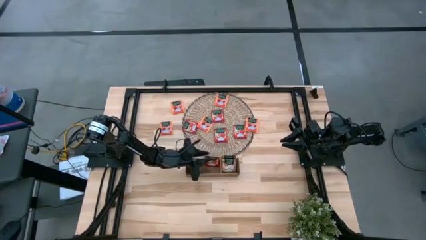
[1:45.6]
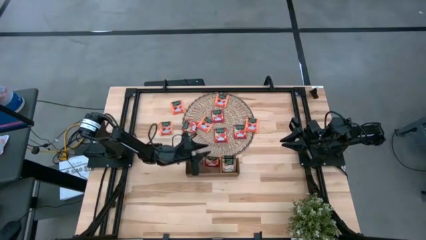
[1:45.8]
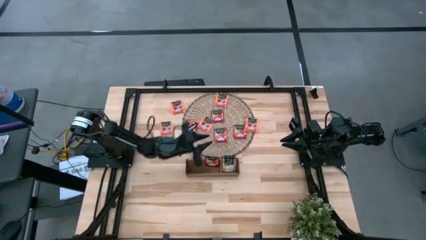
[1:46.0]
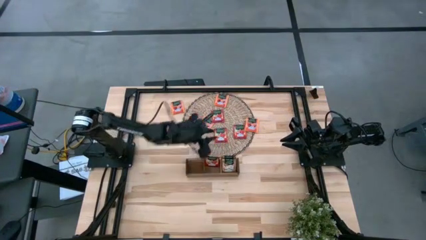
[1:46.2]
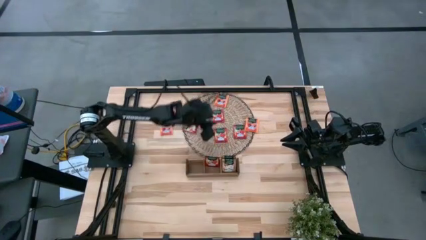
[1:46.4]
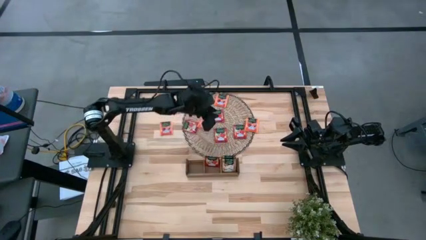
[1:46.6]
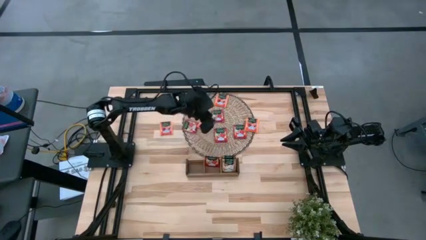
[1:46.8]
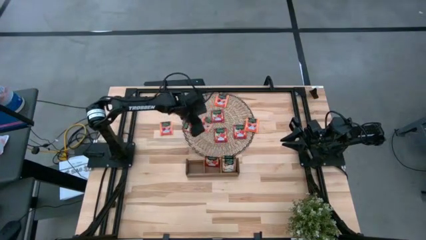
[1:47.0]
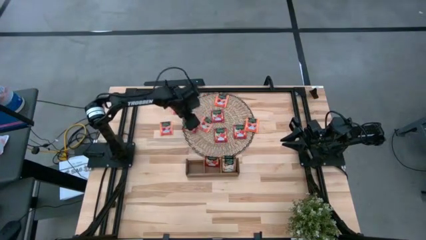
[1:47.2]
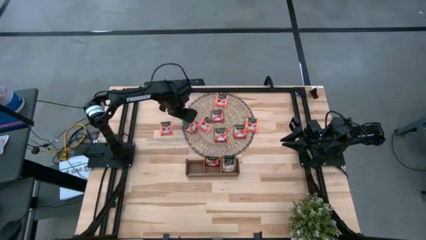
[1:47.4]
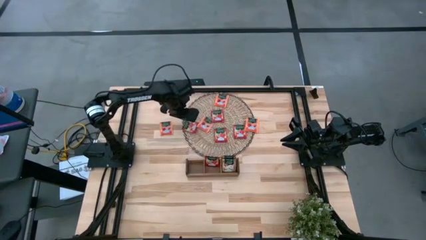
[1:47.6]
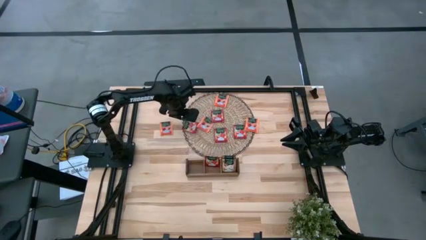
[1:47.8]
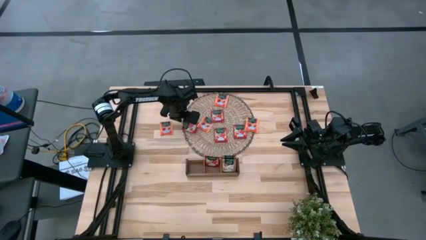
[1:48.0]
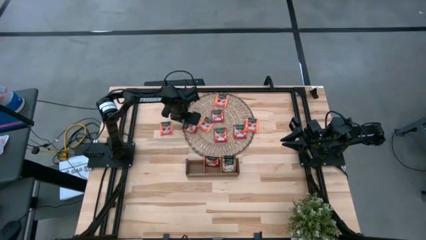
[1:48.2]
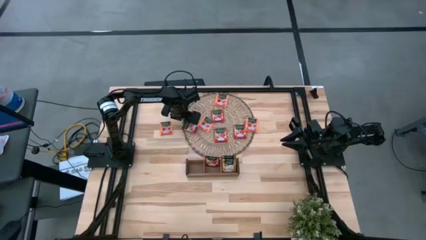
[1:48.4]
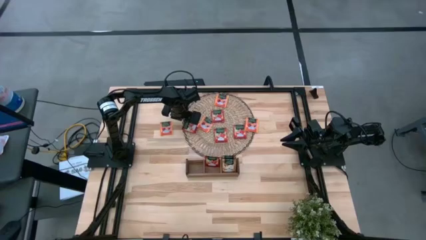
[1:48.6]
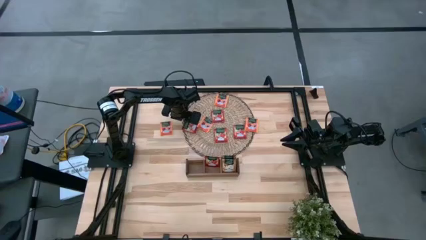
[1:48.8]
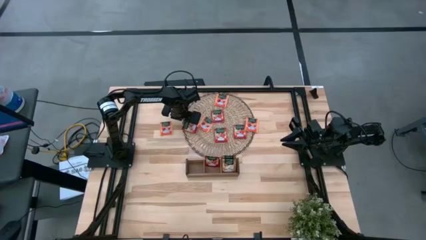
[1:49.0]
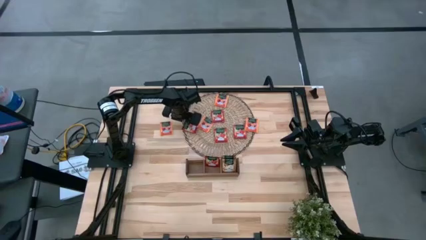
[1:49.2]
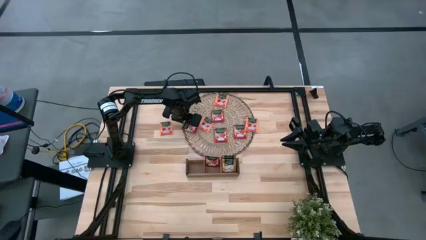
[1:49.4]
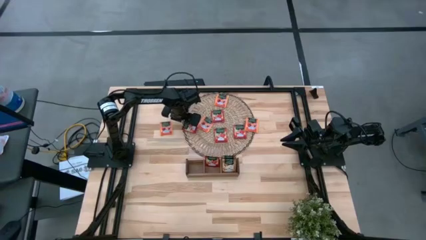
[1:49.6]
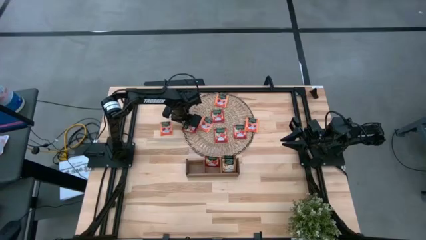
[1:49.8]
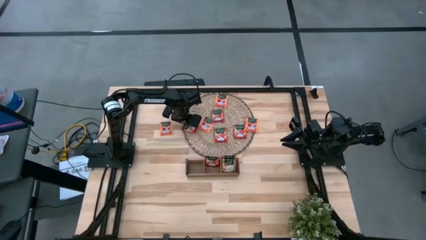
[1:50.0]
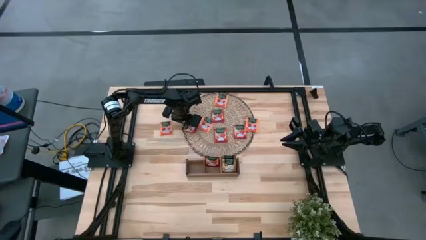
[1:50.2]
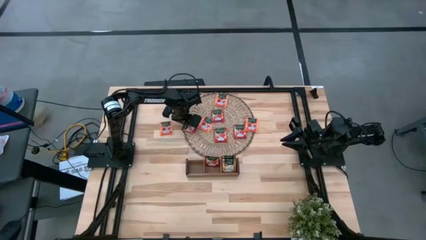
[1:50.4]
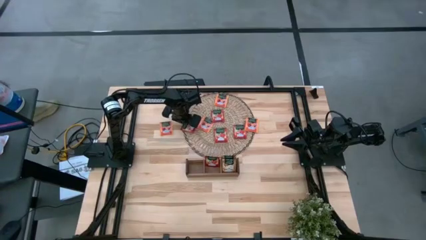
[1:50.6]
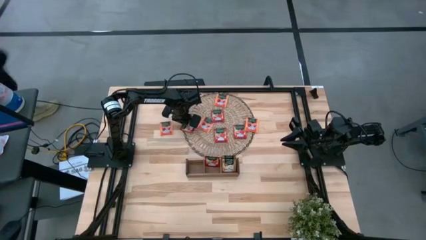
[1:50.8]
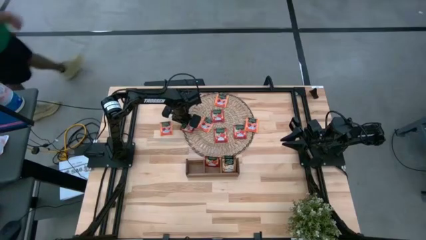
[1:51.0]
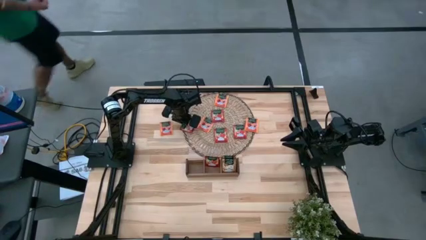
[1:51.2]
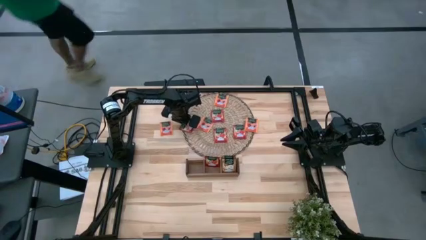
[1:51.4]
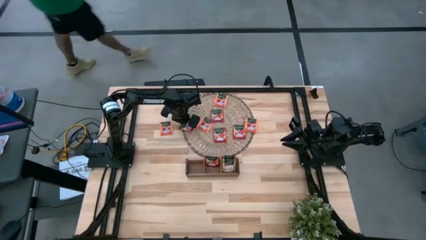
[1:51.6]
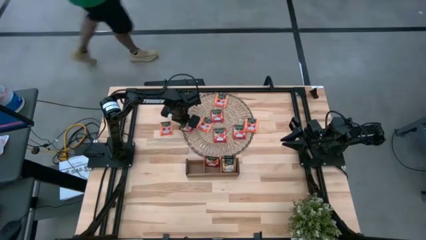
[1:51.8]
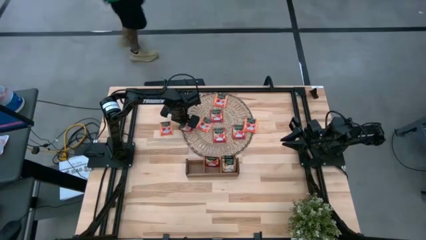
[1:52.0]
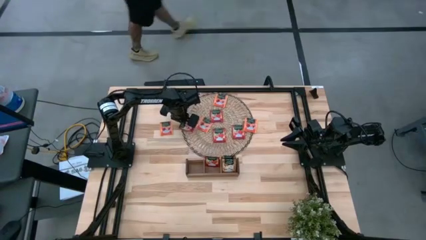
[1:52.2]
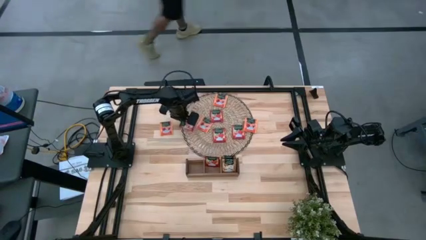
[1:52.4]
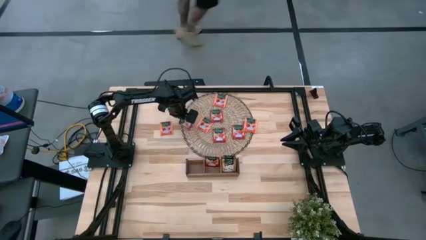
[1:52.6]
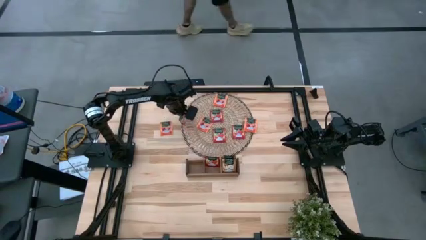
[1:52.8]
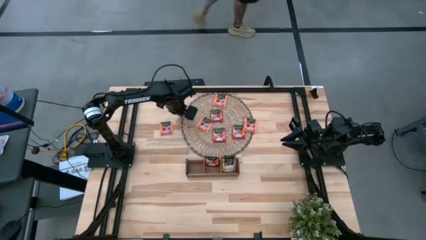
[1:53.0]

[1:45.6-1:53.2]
Task: Pick & Place Tea
Put the red tea bag into the middle section of the wooden organizer
